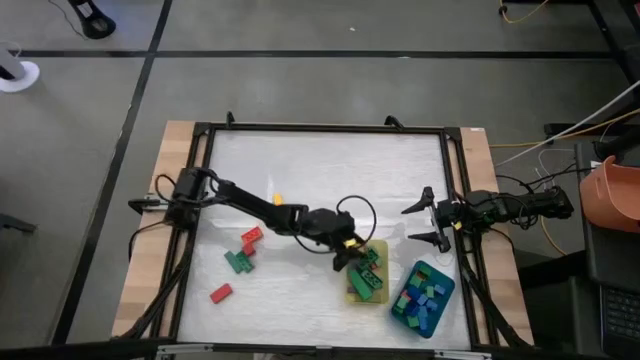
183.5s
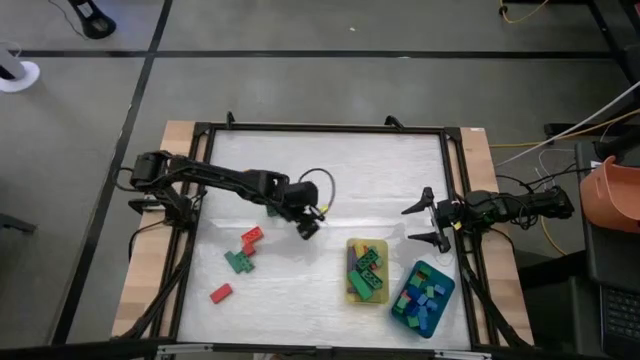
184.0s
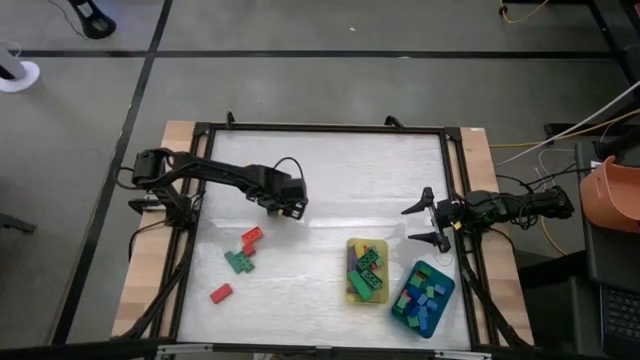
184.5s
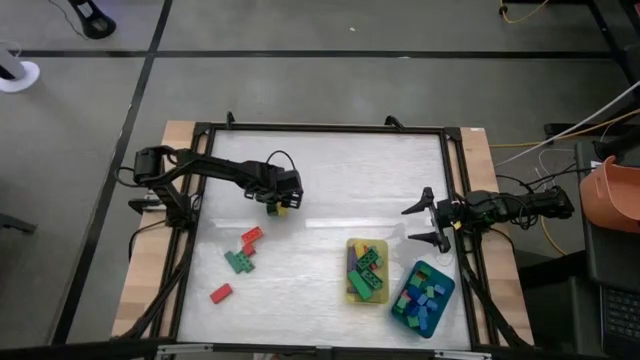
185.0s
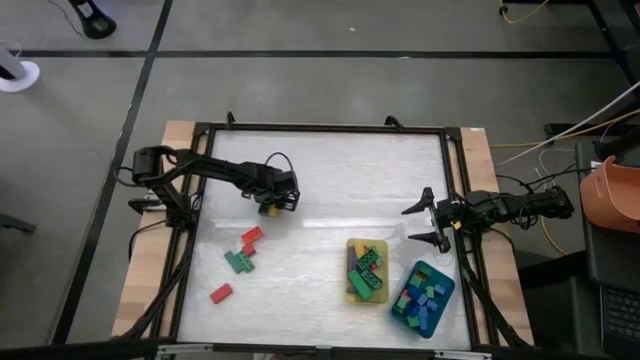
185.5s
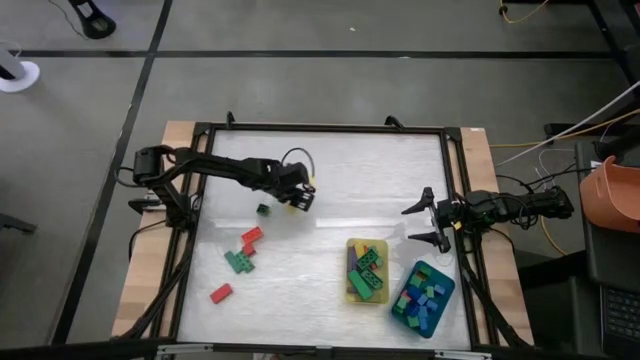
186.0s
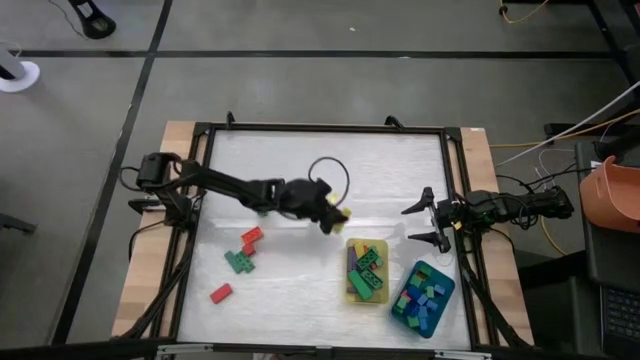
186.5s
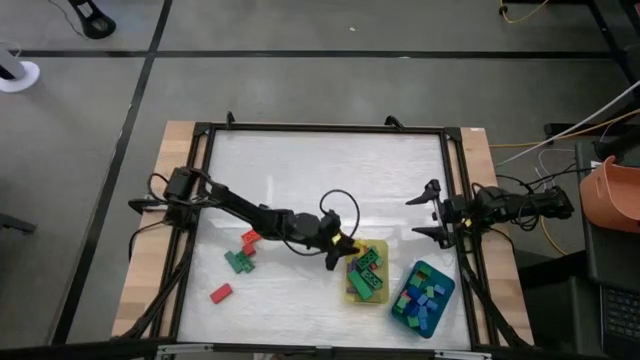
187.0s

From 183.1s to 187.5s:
Task: Sort blocks by size
Put the long yellow block into the yellow bin

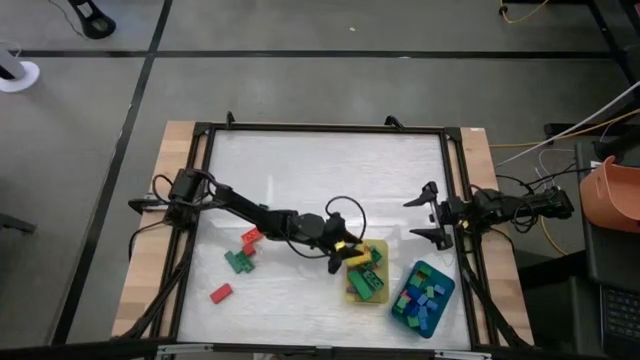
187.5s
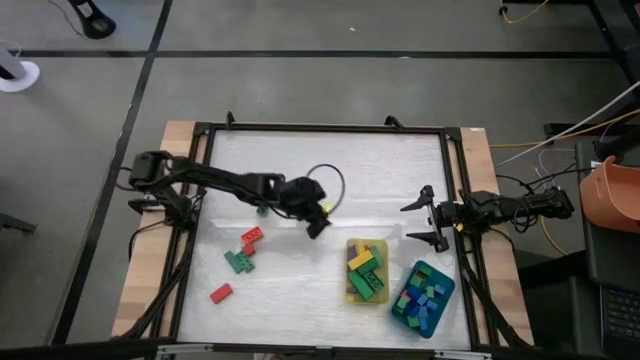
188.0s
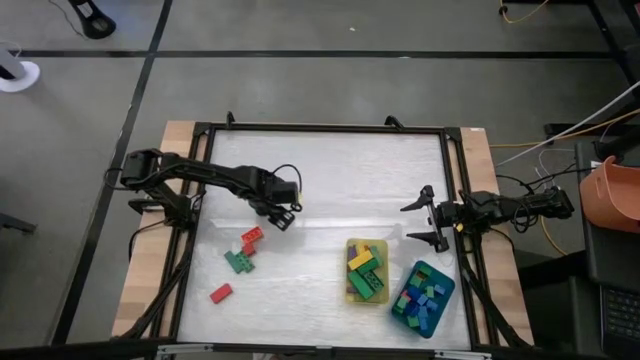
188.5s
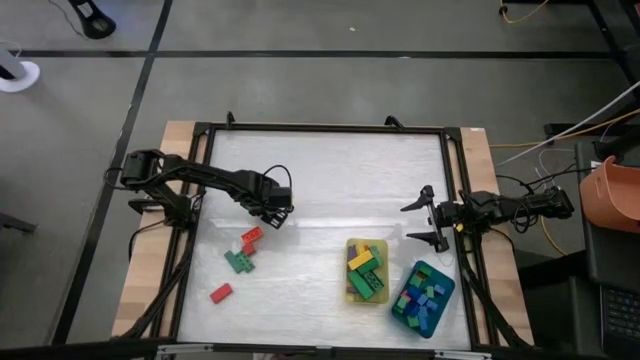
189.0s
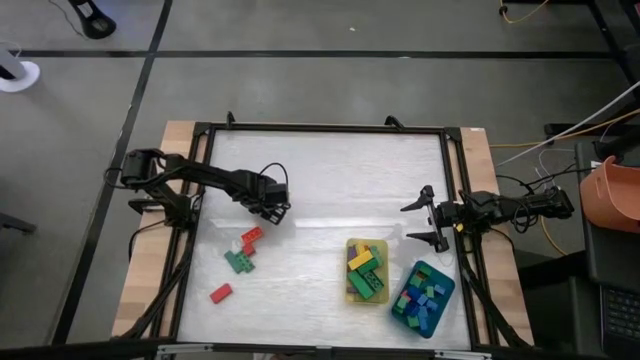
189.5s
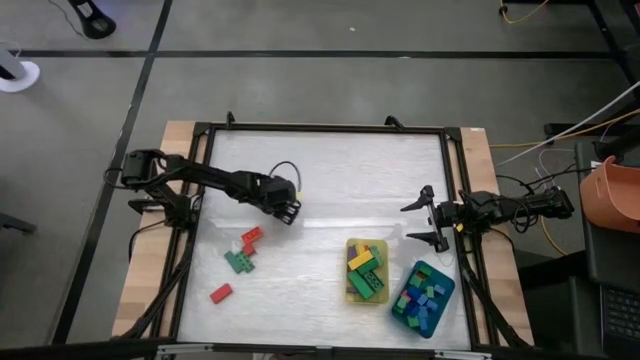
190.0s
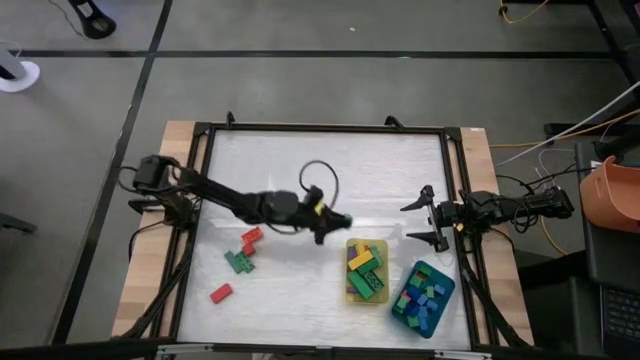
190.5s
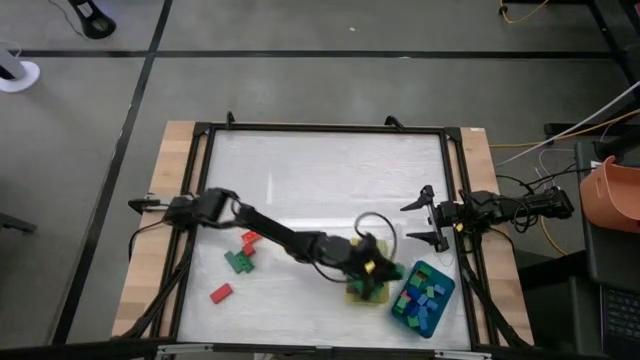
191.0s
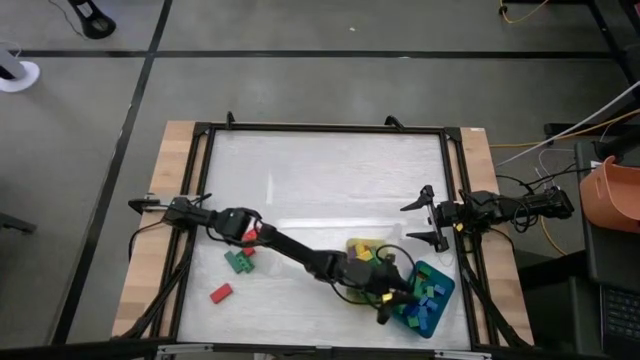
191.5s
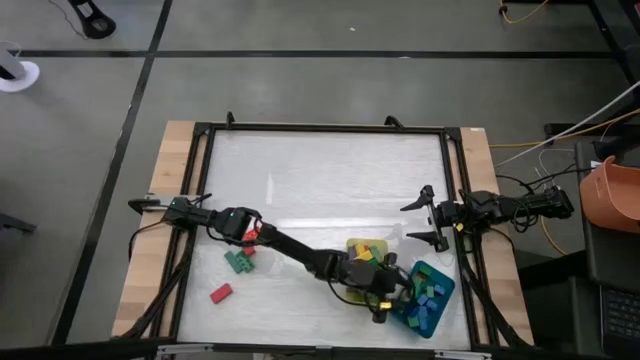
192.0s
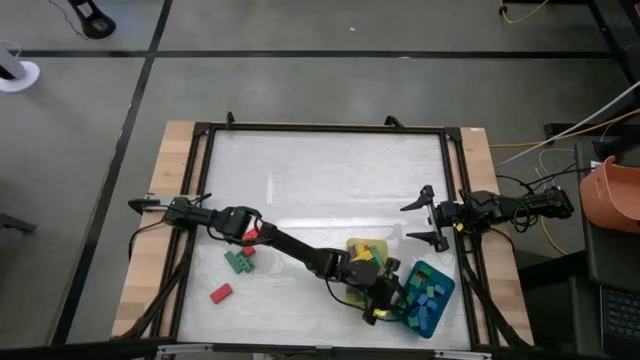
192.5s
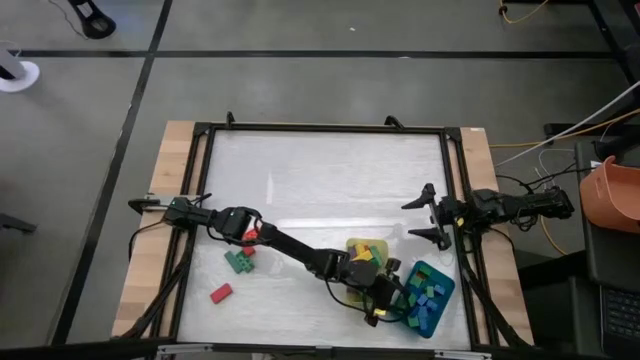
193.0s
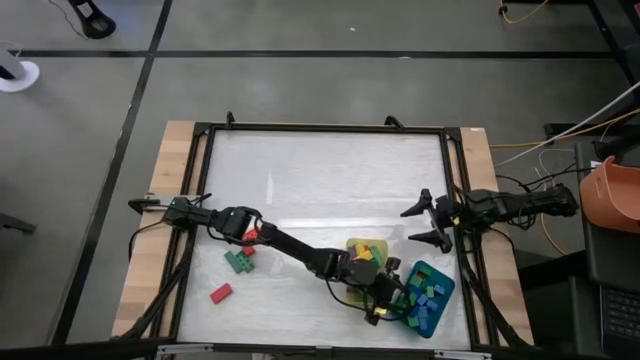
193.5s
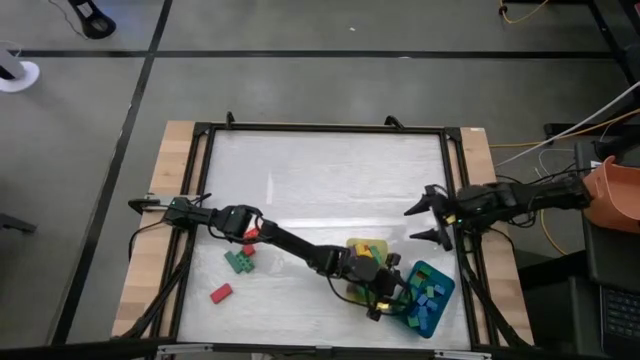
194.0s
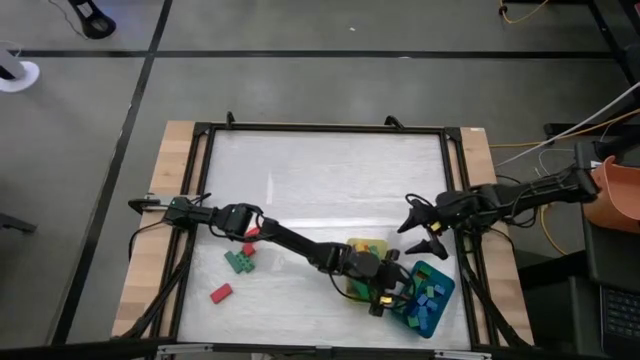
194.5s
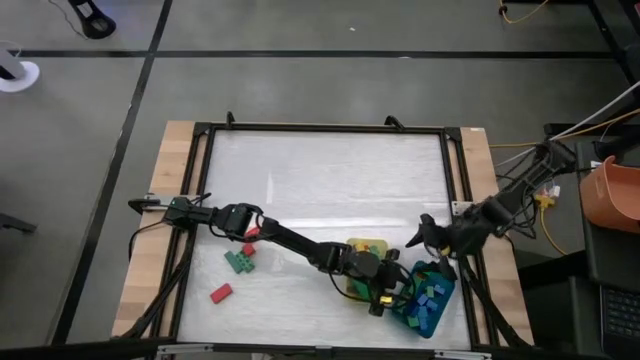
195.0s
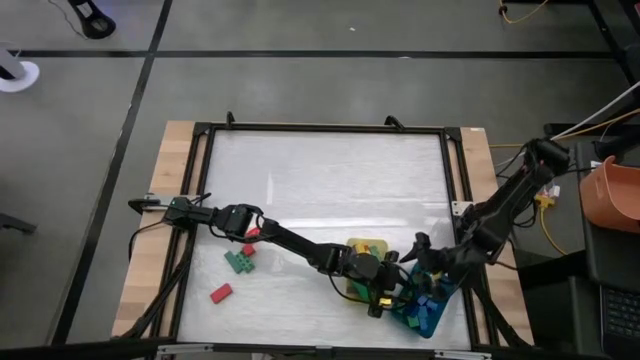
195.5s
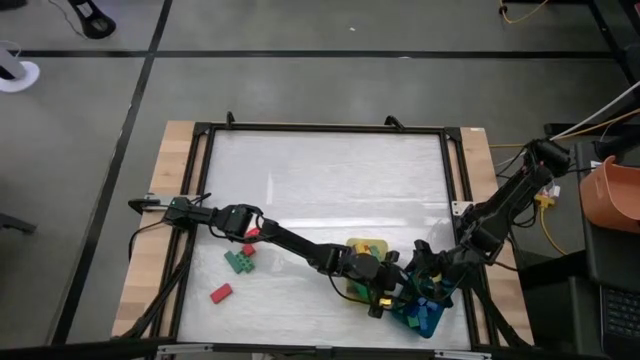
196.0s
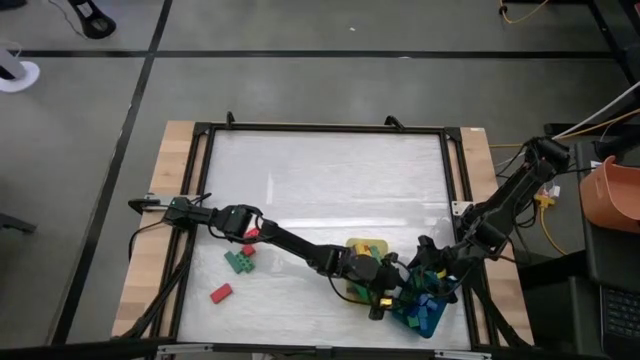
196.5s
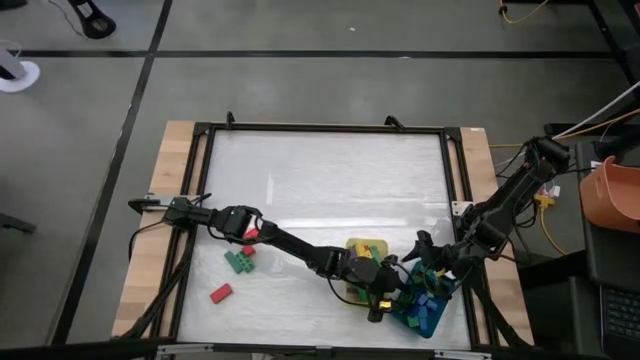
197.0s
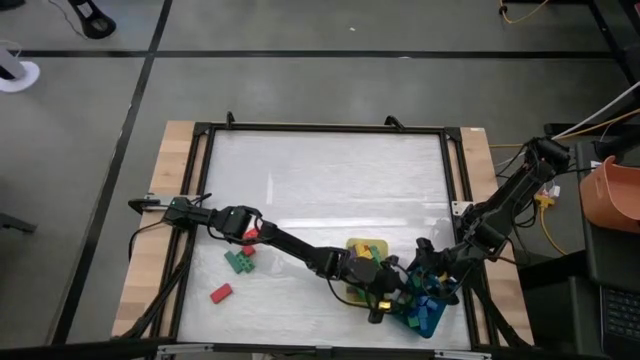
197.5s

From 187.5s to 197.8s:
Put the small green game piece into the blue bin

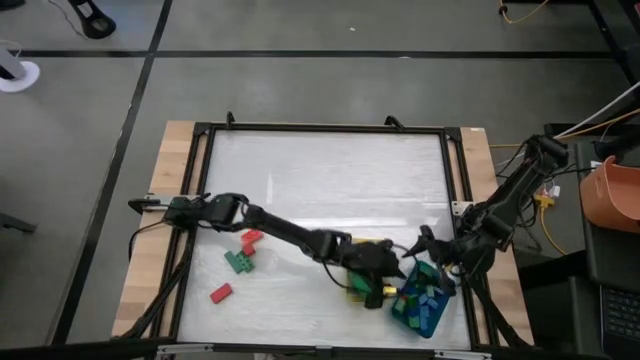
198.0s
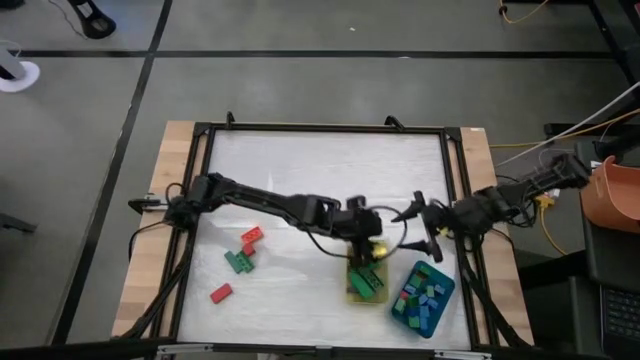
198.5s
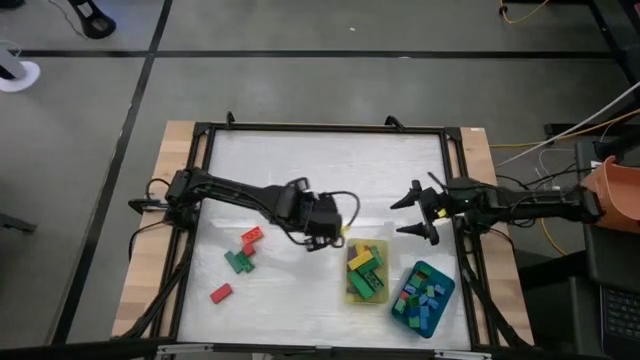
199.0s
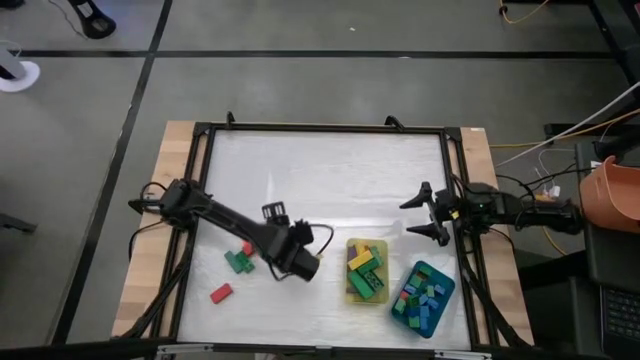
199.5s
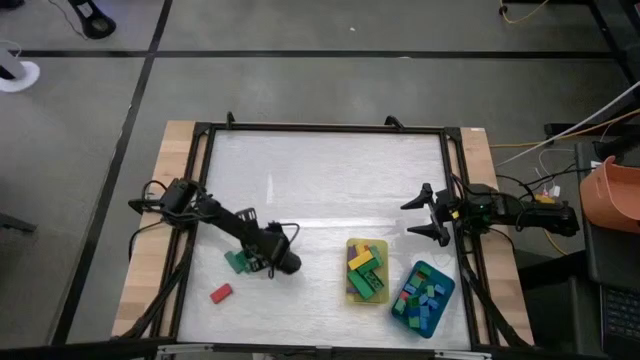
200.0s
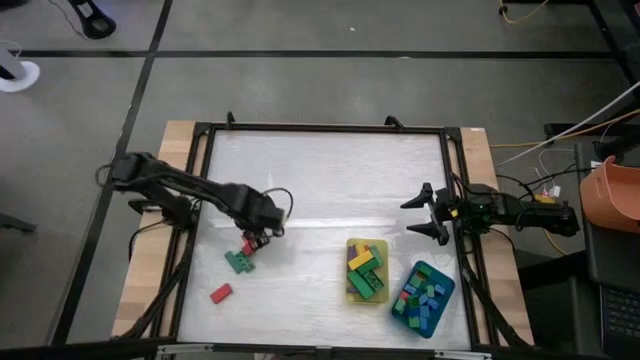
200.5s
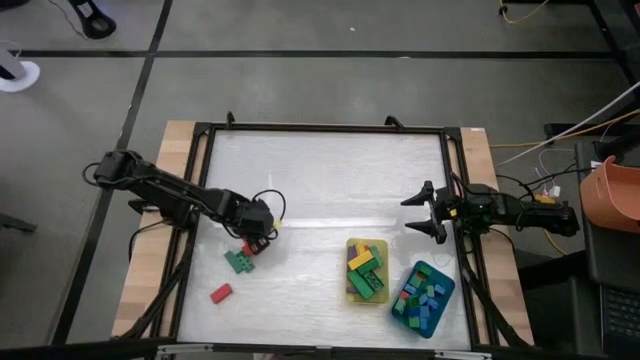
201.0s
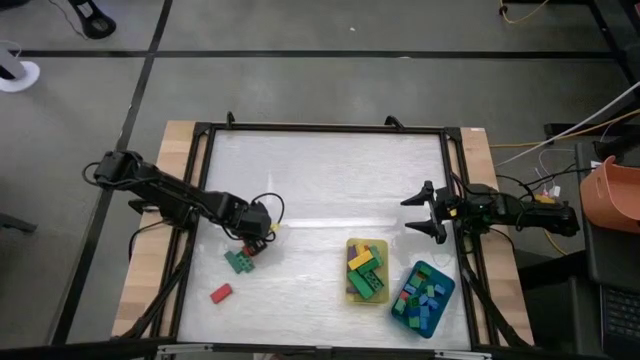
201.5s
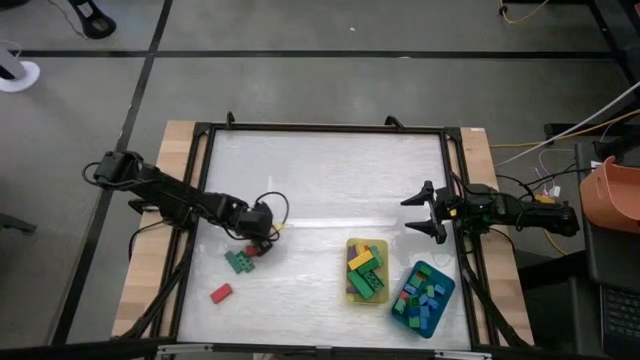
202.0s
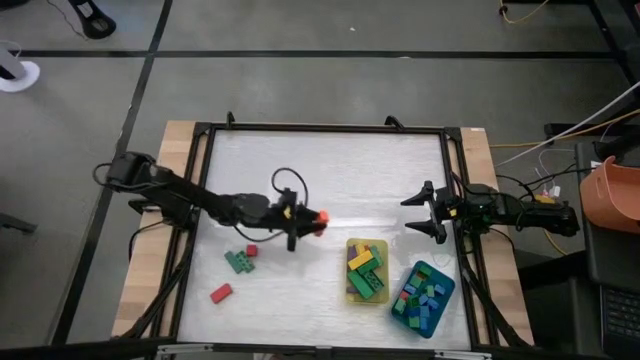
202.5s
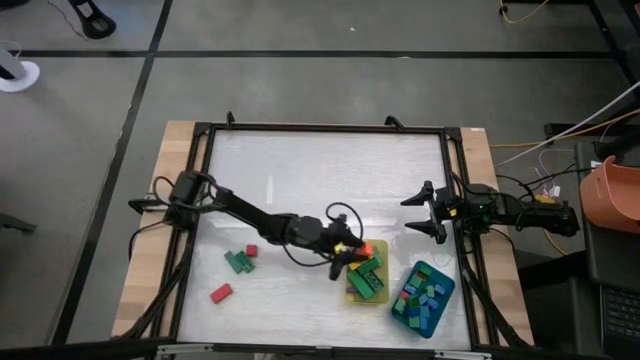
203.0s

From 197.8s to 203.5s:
Put the long orange game piece into the yellow bin

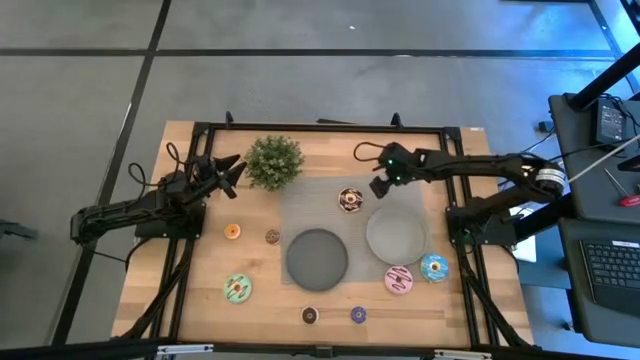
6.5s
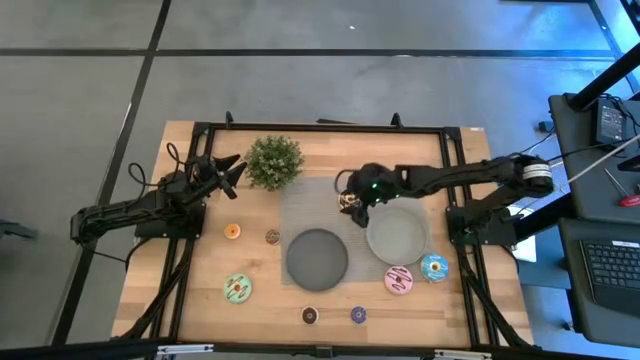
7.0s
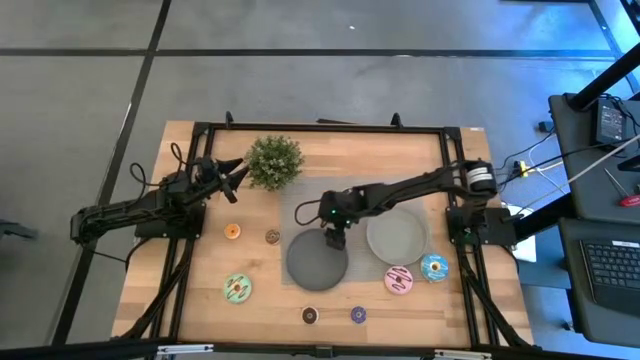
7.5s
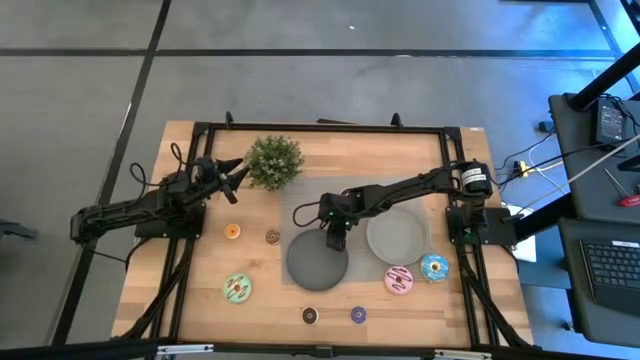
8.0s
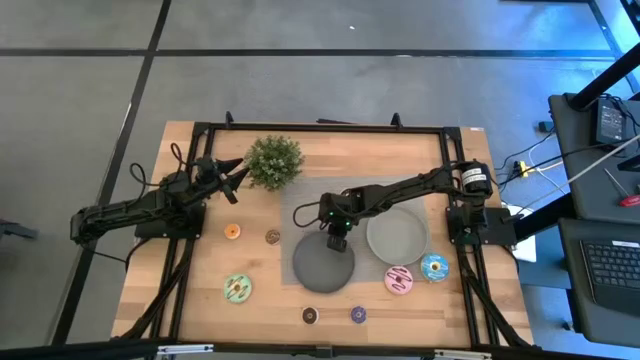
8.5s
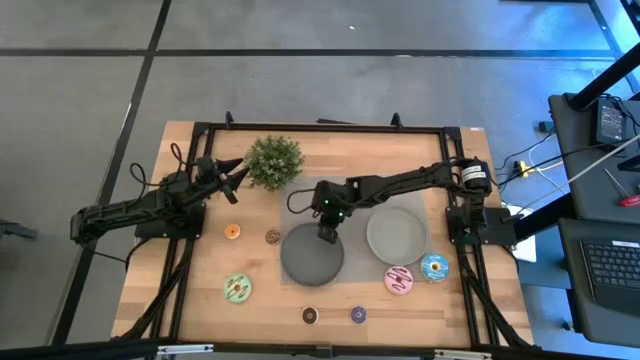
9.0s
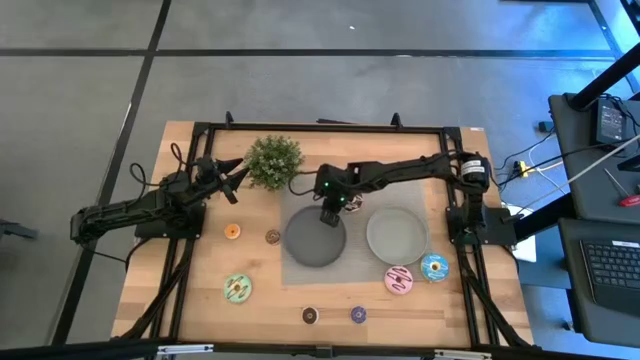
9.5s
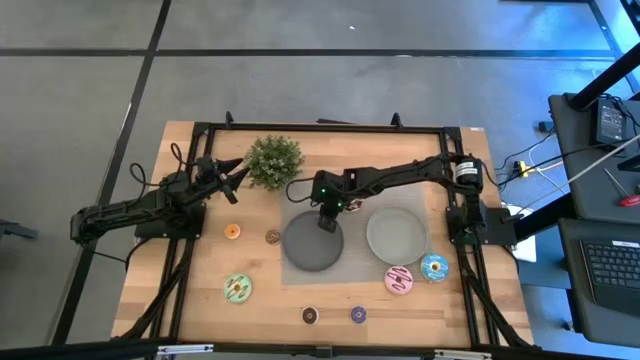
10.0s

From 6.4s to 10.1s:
Task: Pick & Place donuts
Adjust the dark gray plate on the mat
